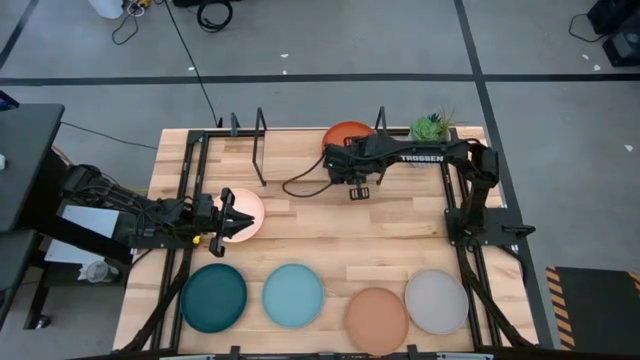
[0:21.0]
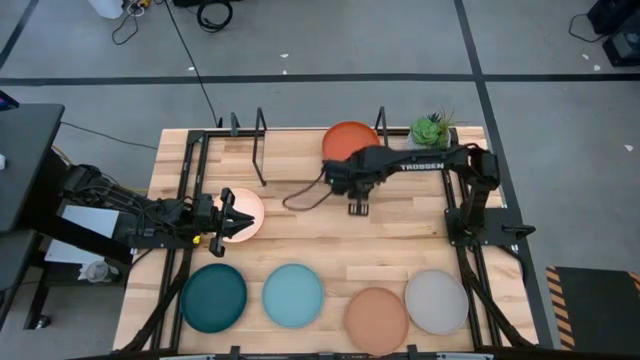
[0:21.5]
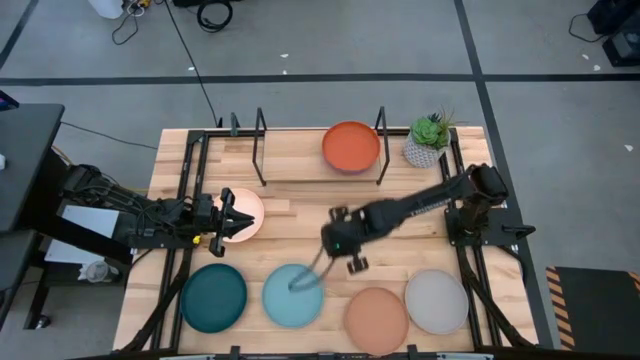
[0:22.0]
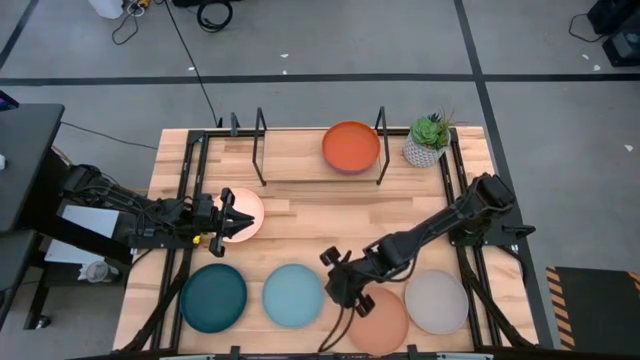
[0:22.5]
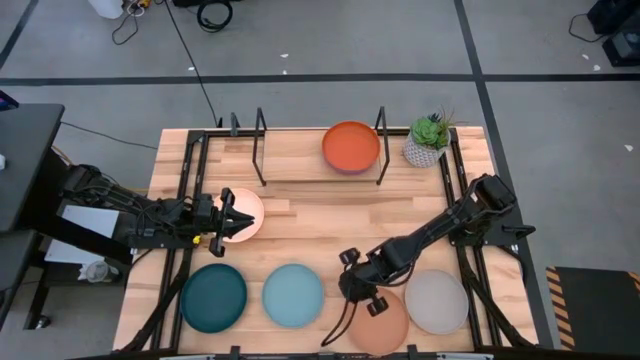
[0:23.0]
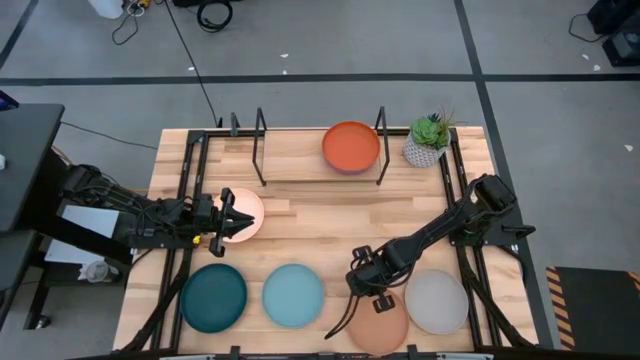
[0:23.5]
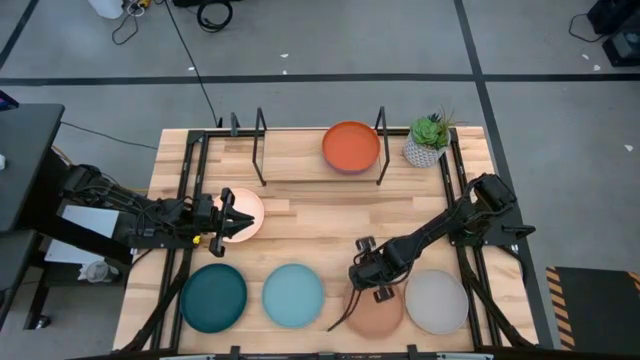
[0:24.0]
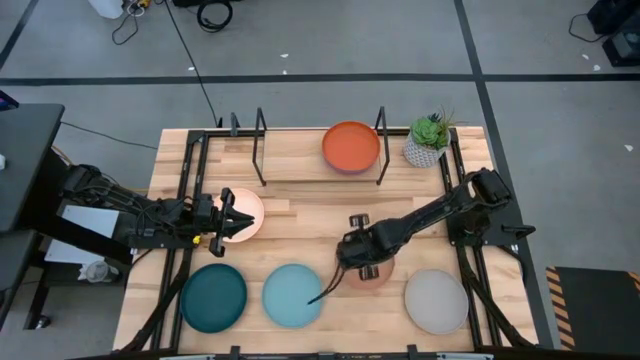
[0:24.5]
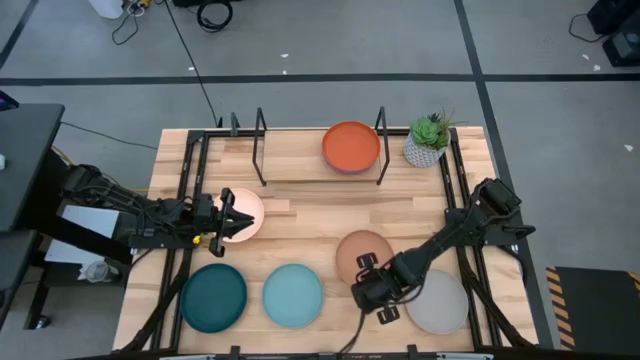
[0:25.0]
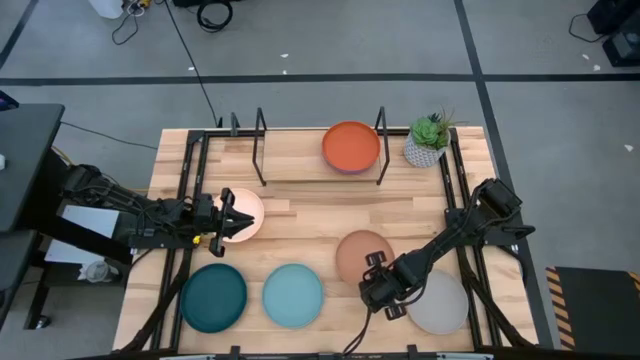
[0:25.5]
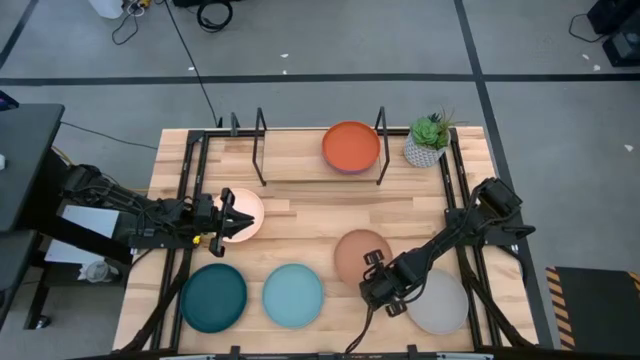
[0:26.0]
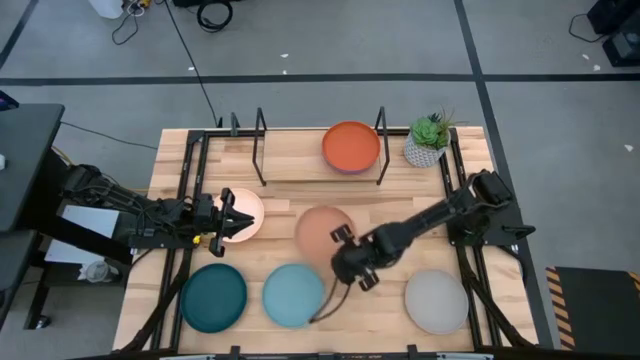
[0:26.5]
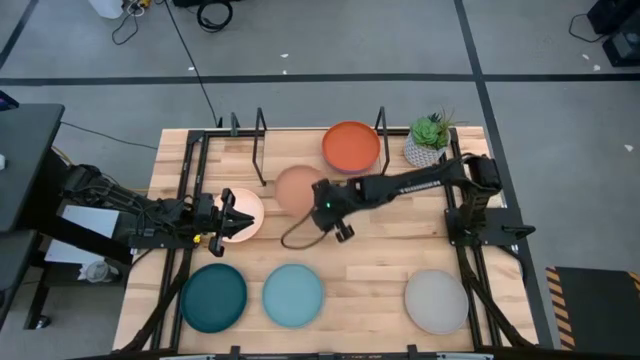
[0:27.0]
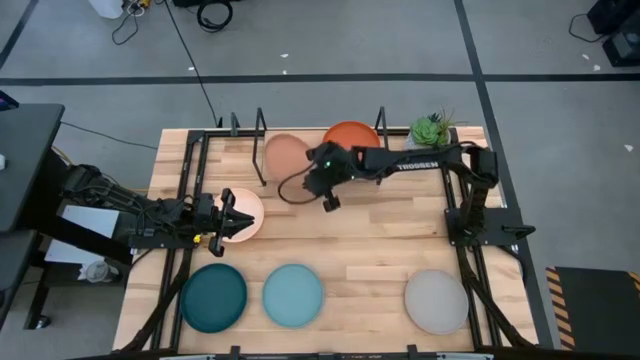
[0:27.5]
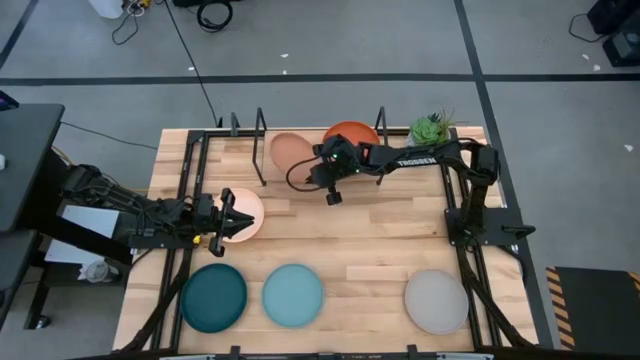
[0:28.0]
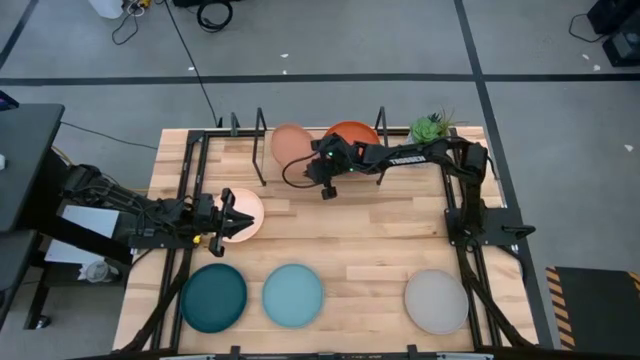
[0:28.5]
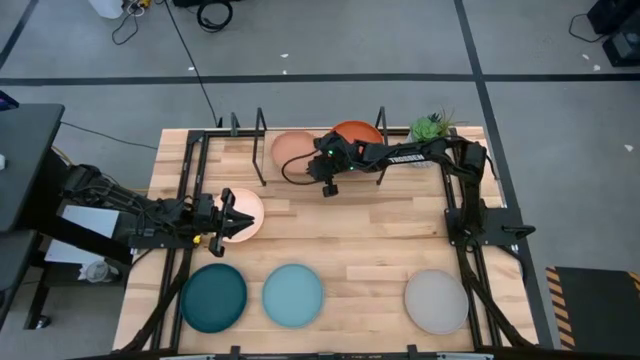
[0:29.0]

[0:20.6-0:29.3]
Task: Place and stack plates onto a shelf
Put the brown plate on the shelf

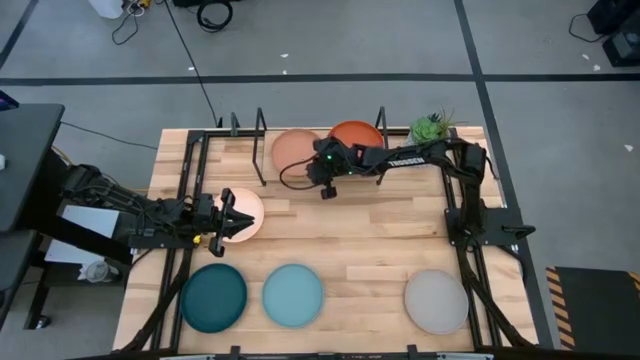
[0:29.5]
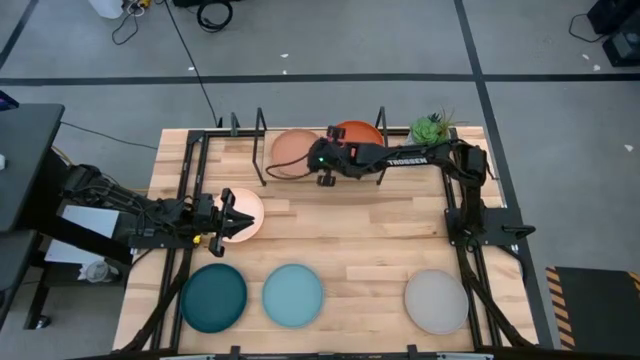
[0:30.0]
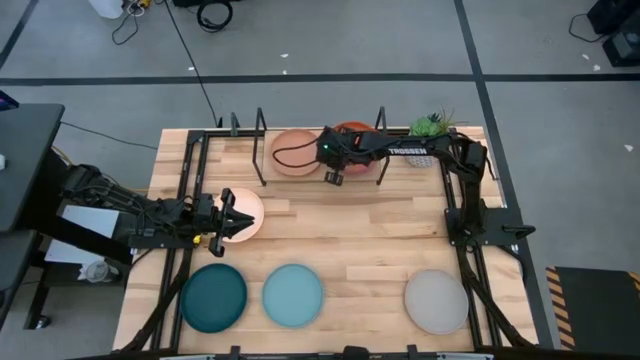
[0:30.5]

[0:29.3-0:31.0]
Adjust the stacked plates on the plates

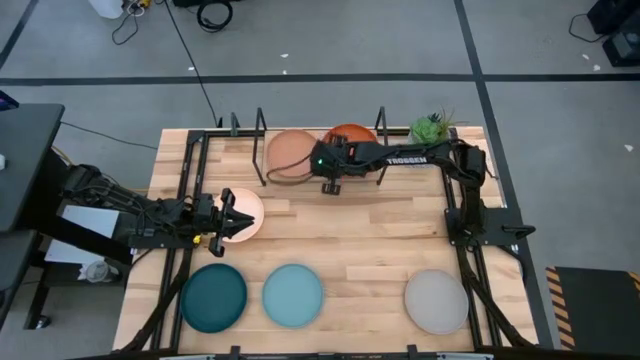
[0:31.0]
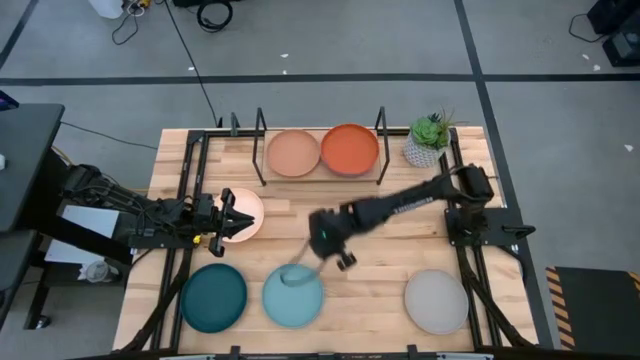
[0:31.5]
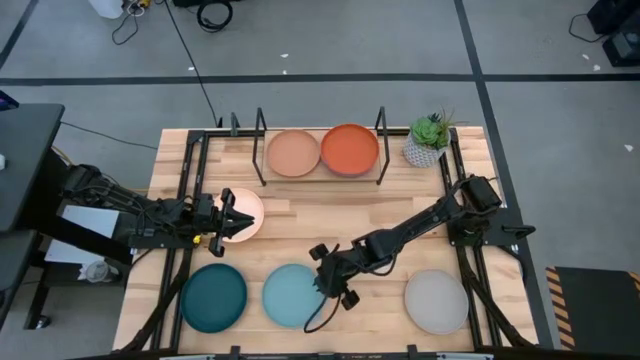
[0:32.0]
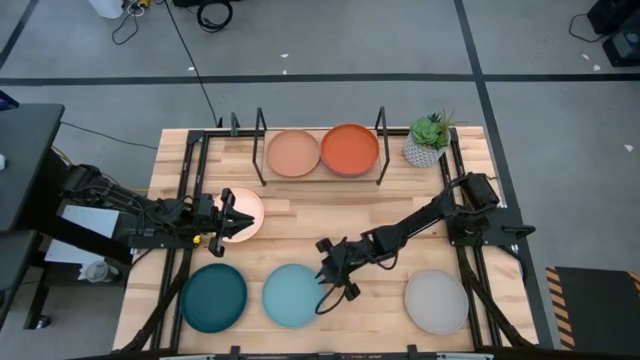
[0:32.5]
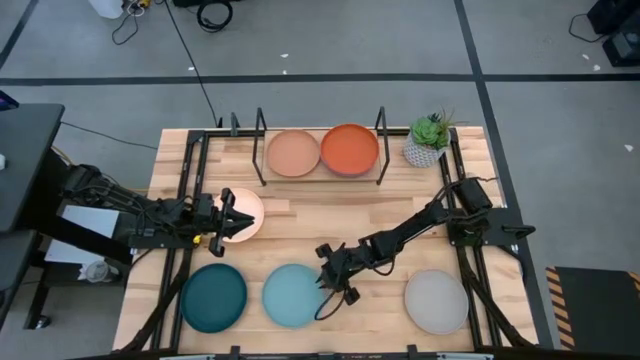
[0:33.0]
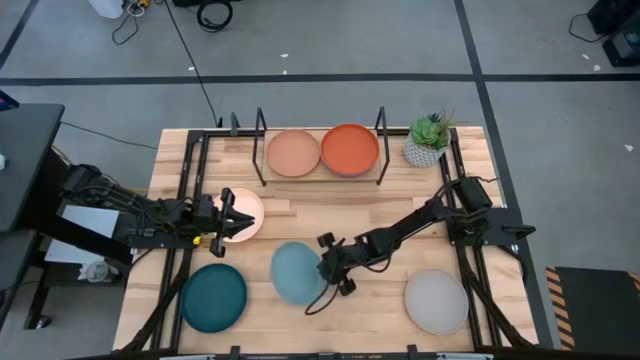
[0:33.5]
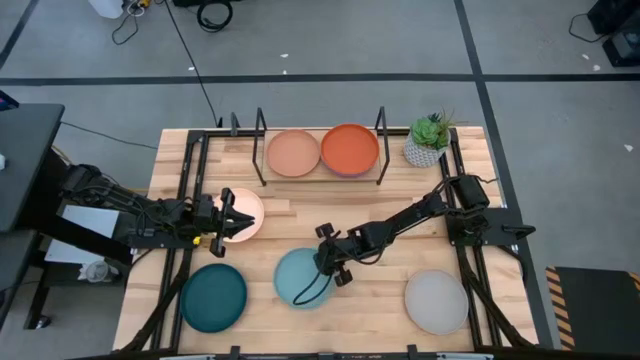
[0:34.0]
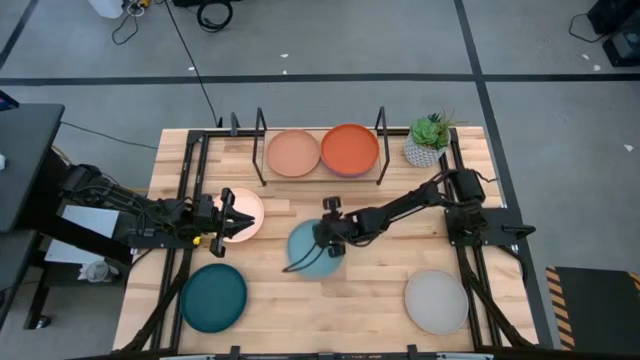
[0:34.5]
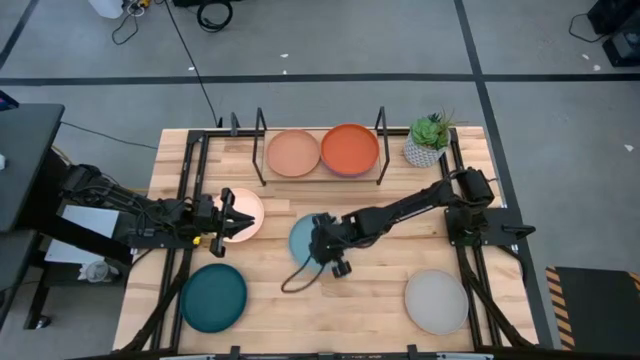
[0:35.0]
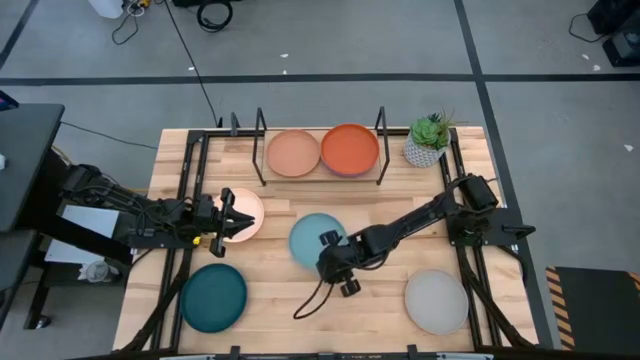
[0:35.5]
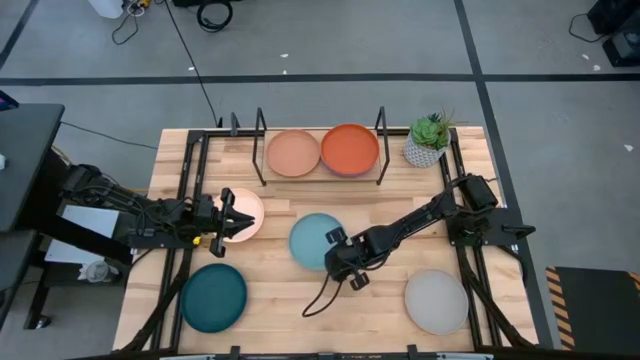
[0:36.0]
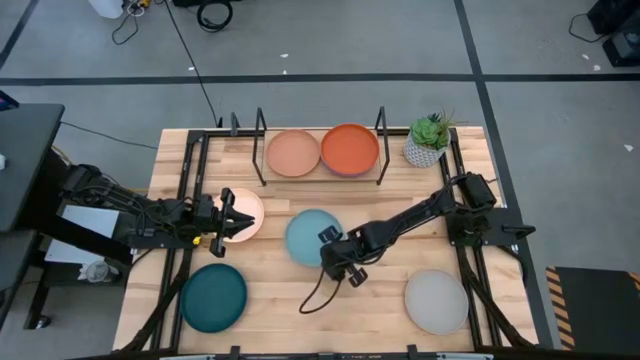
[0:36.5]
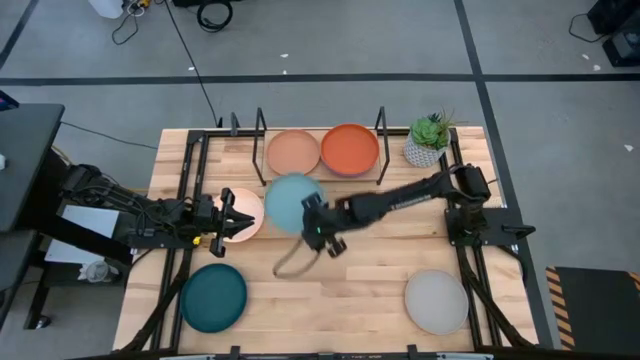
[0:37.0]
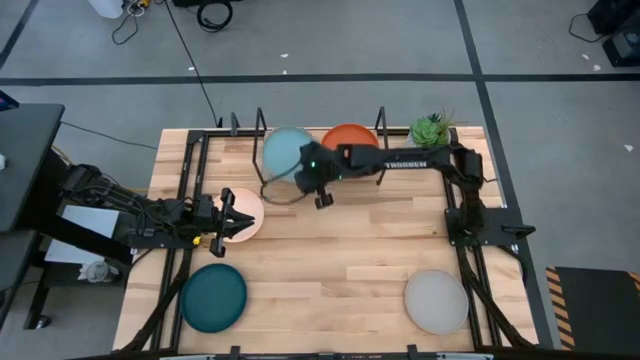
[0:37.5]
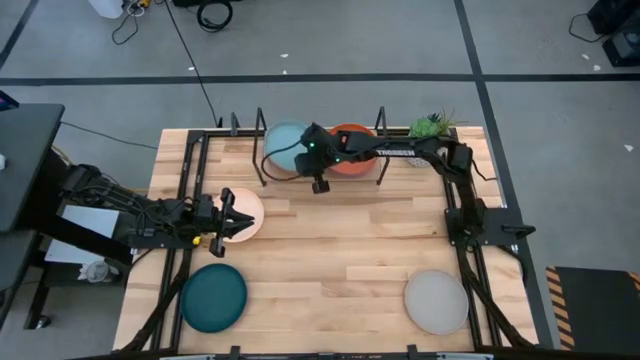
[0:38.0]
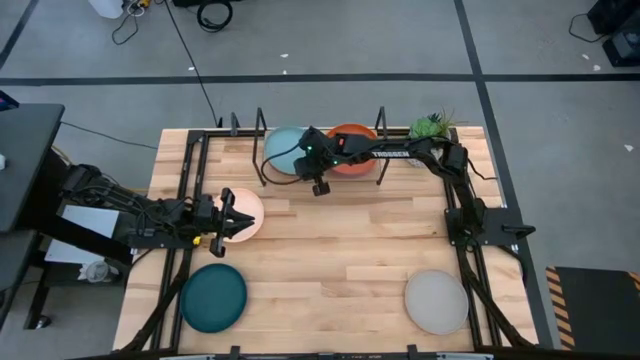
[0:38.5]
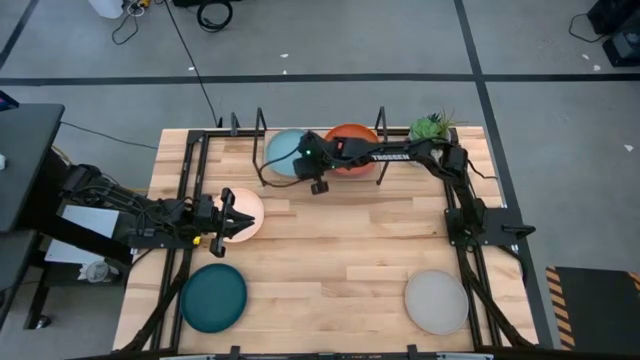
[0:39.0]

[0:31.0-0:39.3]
Stack the light blue plate on the brown plate on the shelf

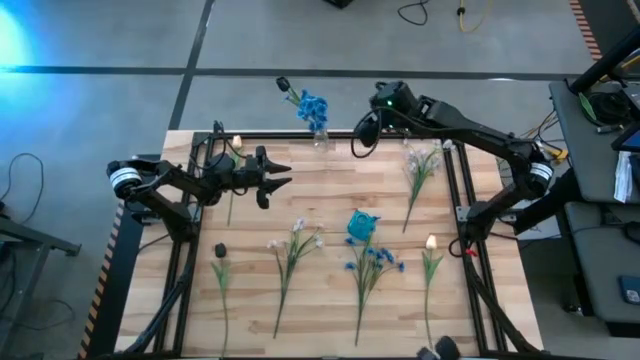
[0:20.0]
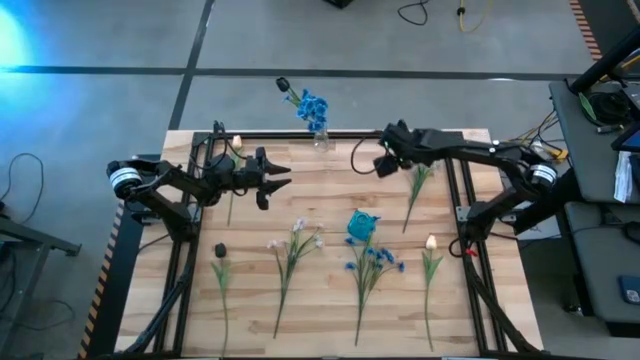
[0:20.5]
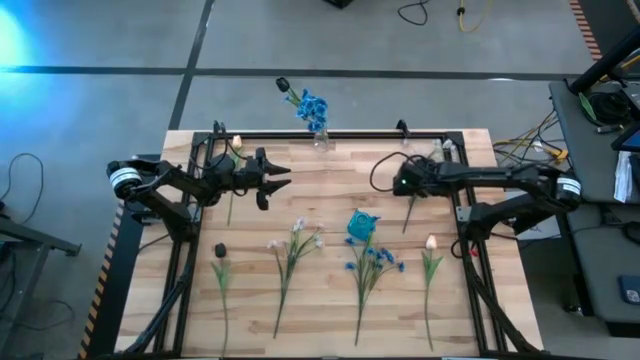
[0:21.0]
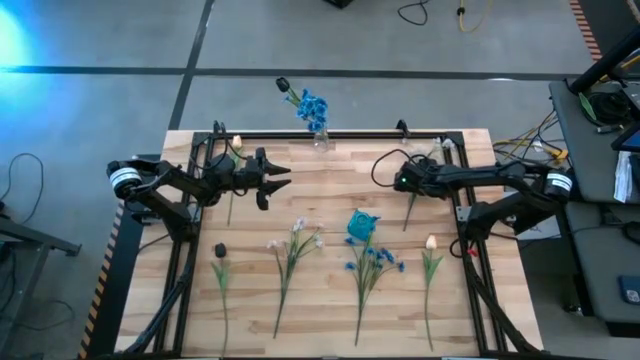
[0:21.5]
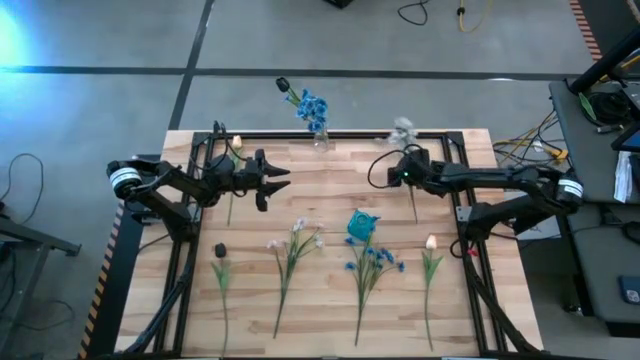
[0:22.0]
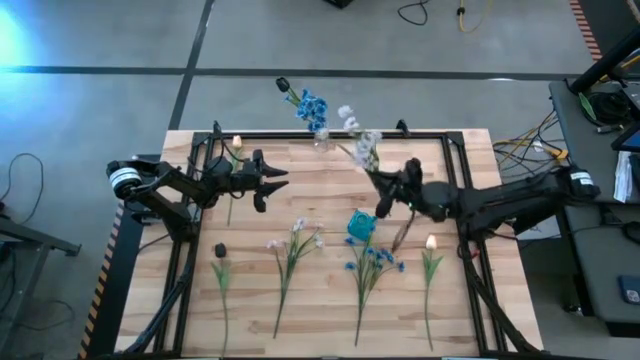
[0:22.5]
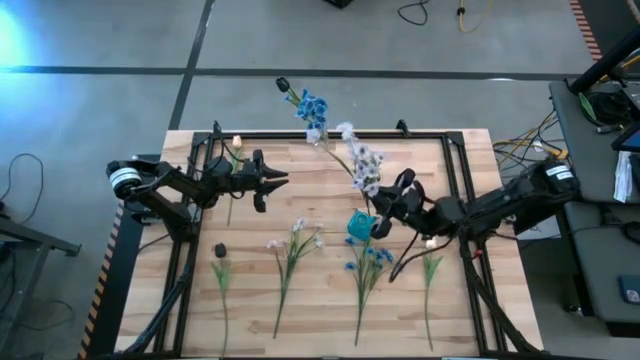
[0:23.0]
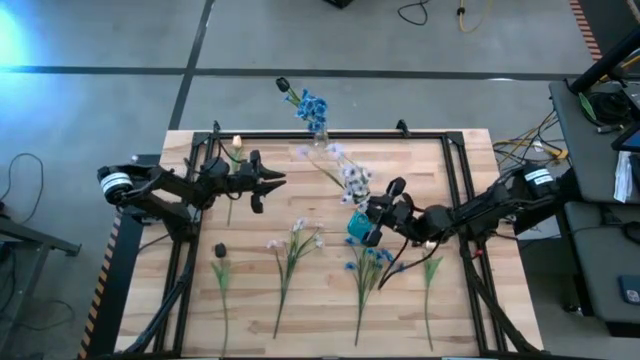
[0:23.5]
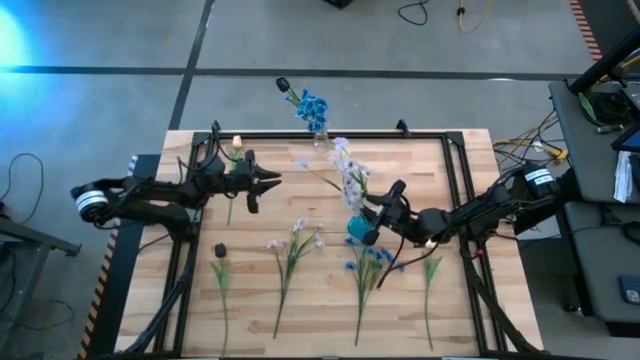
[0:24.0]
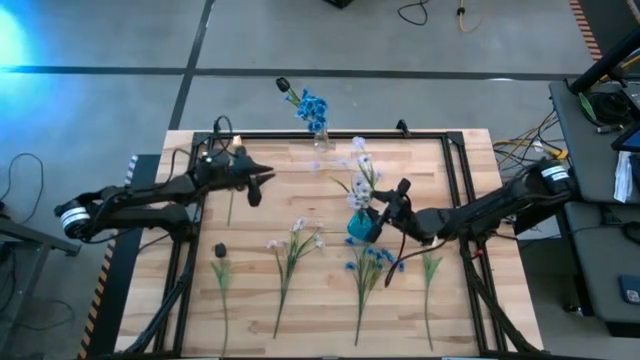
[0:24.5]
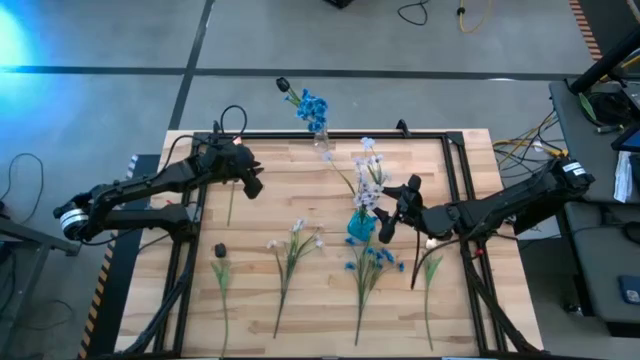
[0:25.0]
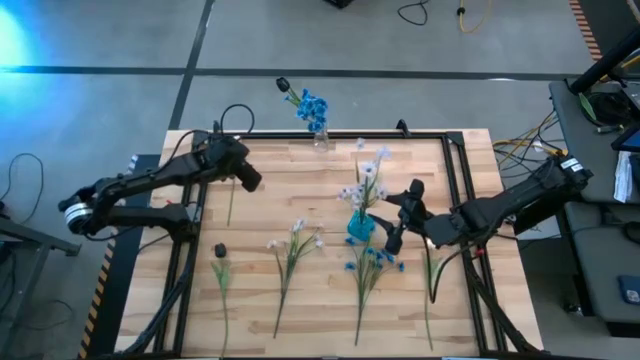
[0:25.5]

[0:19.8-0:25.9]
Task: Sort flowers into vase by color
Put the top white flowers into the blue vase
